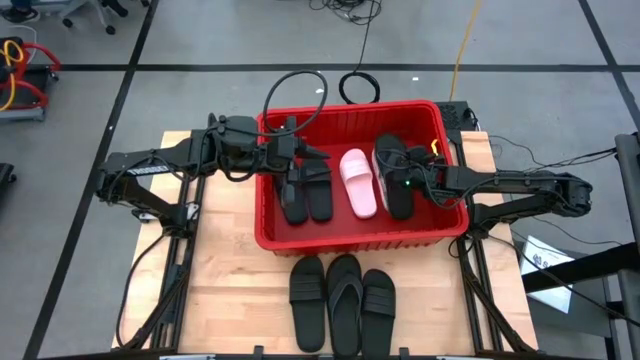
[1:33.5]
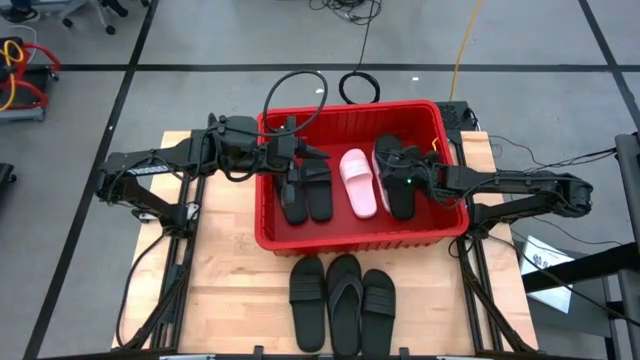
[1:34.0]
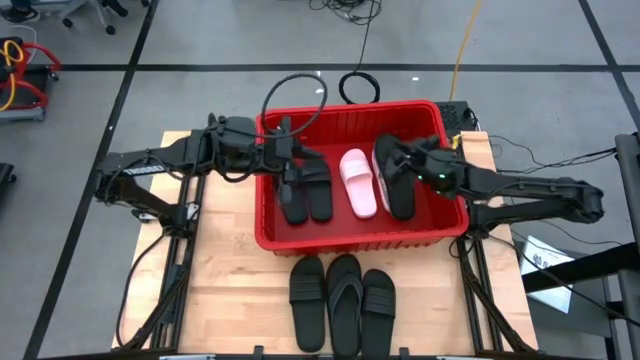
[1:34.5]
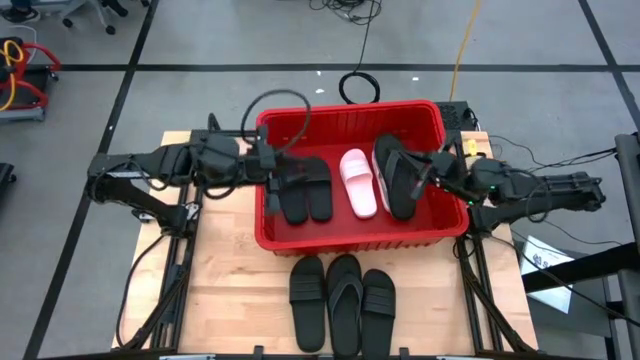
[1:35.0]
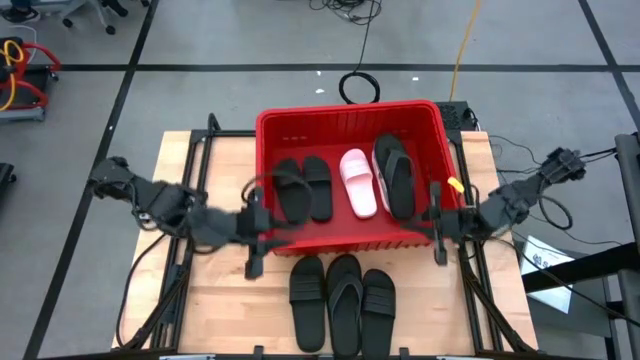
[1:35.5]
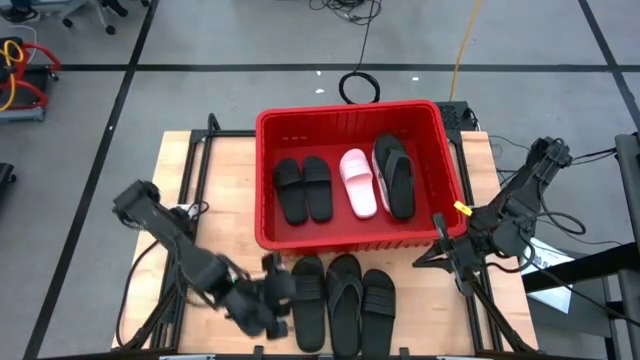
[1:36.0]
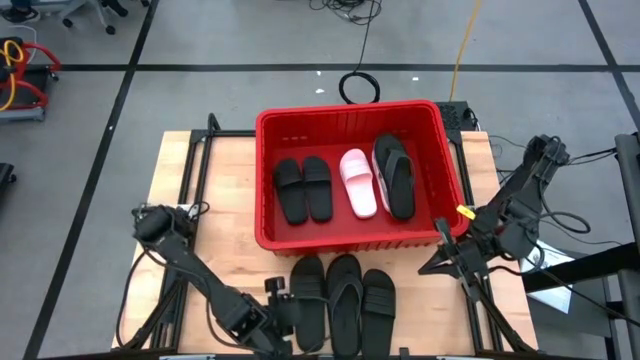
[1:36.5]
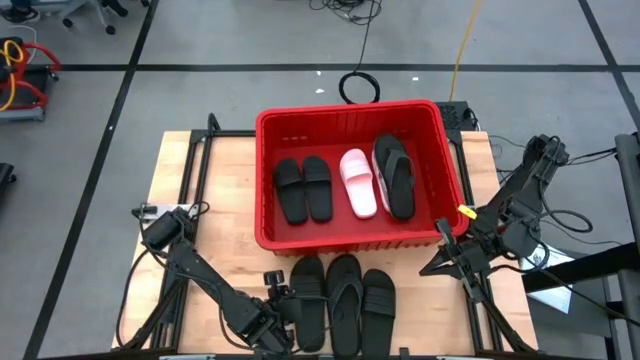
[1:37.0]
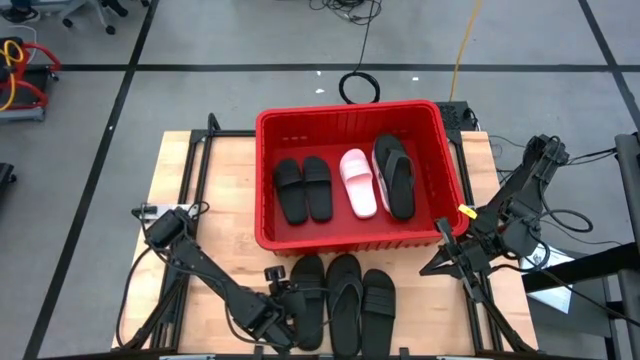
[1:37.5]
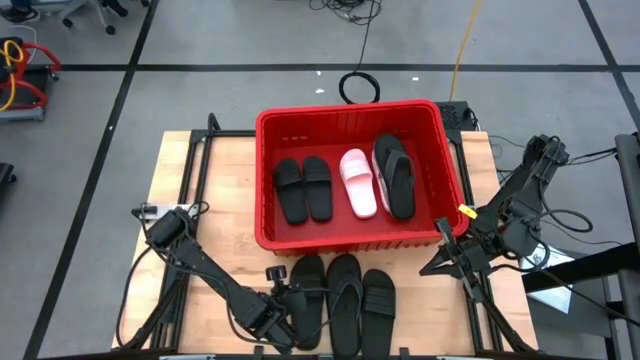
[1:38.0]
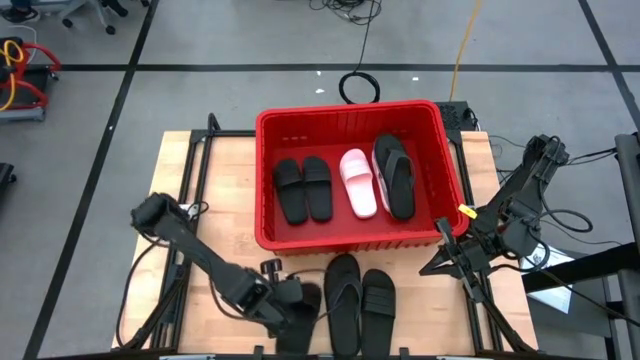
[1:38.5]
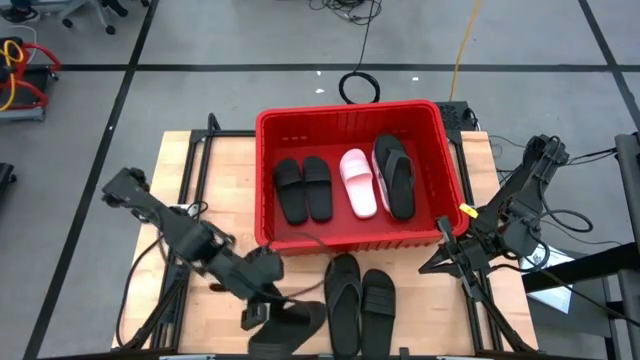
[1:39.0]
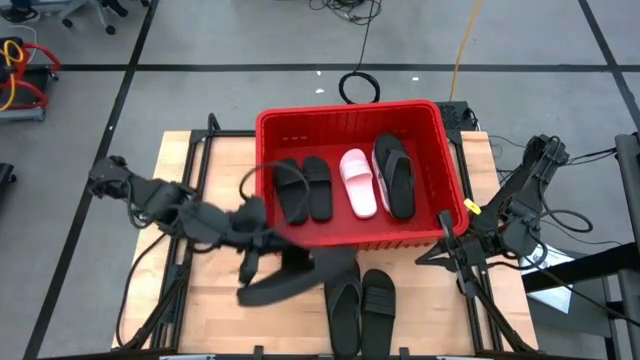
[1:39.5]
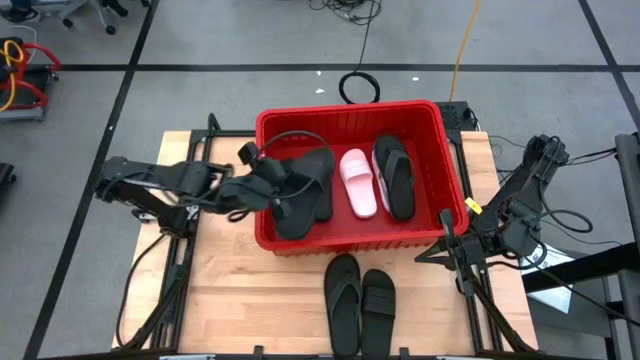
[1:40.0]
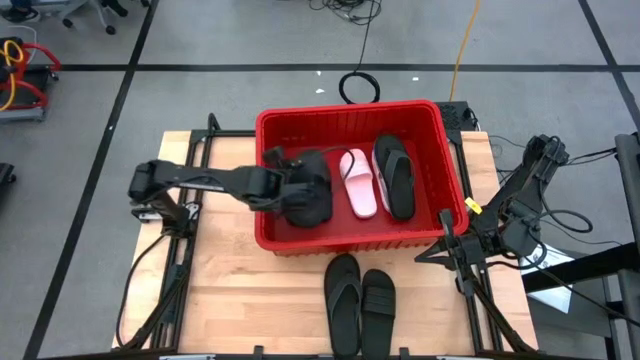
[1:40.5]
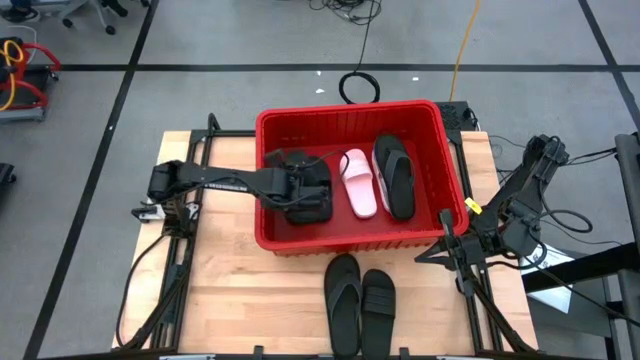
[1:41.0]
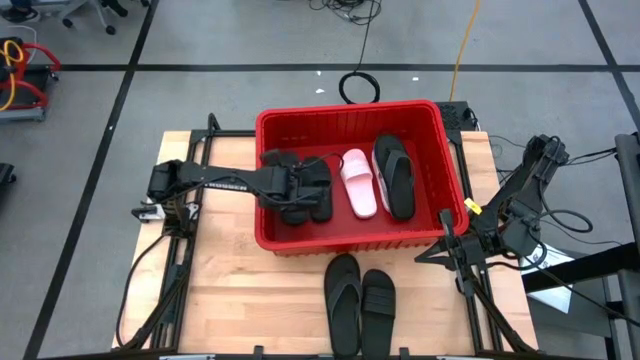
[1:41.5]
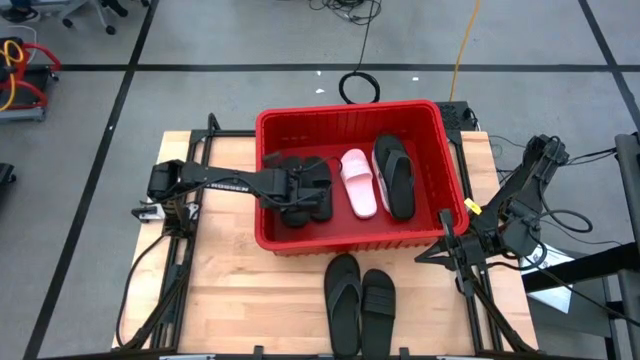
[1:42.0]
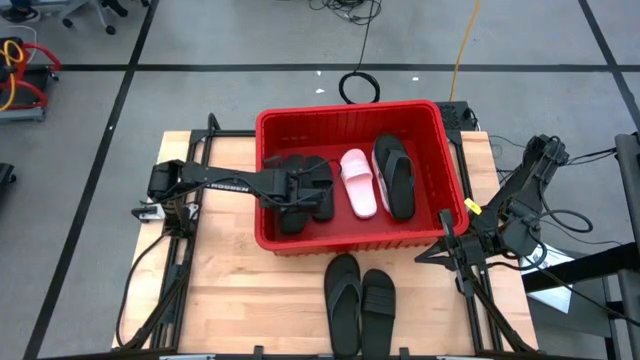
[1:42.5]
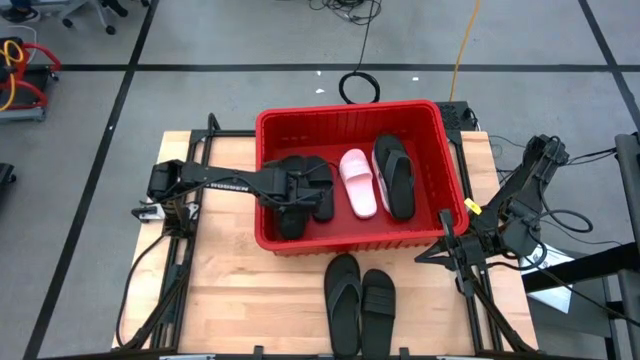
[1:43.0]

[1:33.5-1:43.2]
Task: Pick and place slides into bin
Put the black slide into the red bin

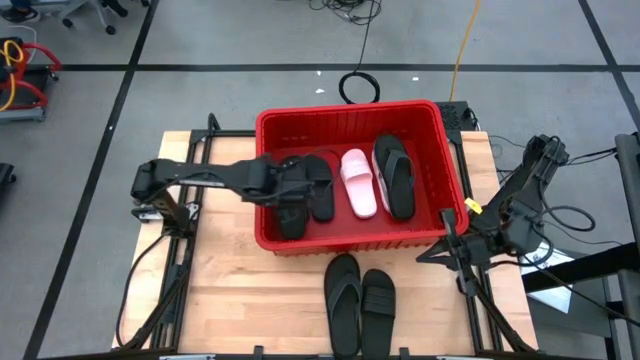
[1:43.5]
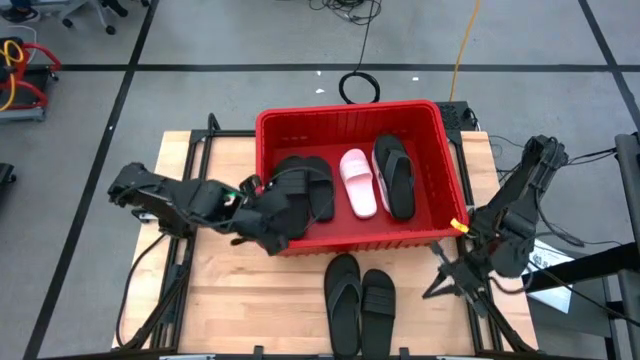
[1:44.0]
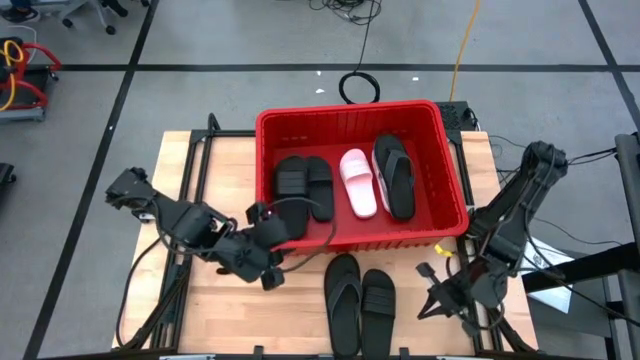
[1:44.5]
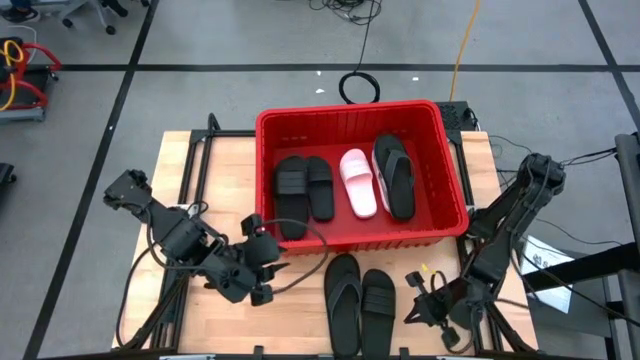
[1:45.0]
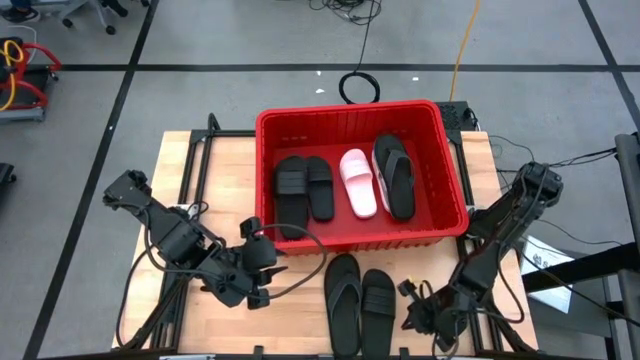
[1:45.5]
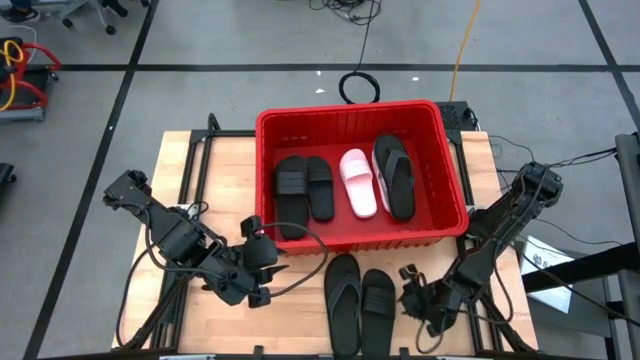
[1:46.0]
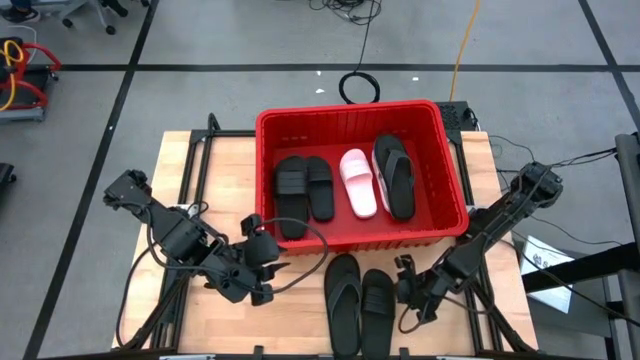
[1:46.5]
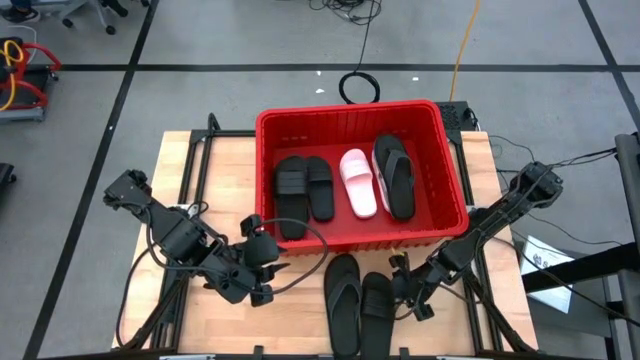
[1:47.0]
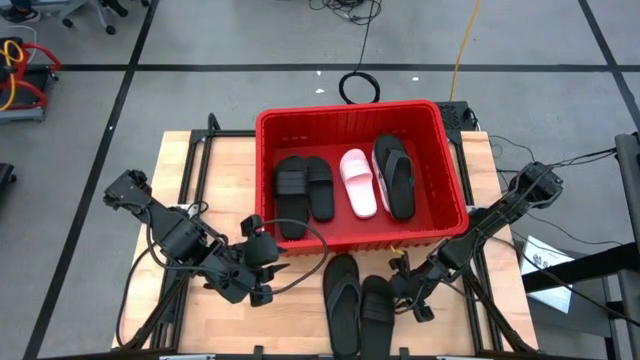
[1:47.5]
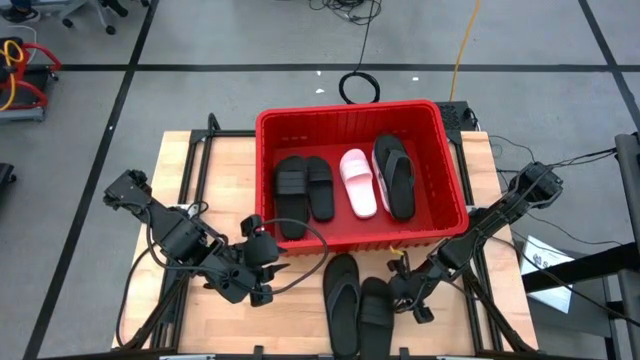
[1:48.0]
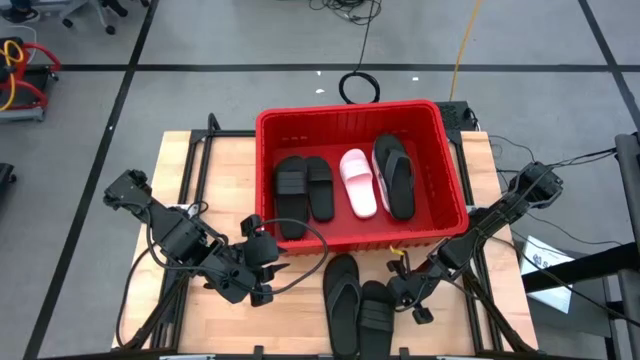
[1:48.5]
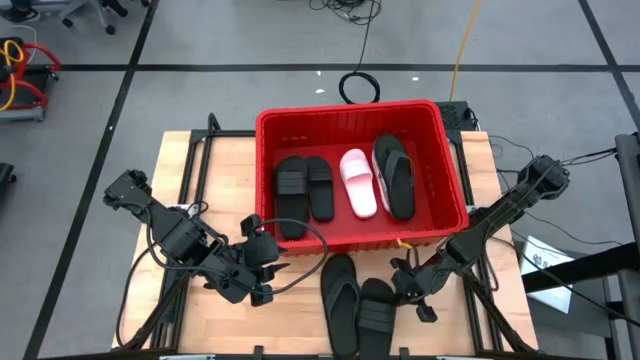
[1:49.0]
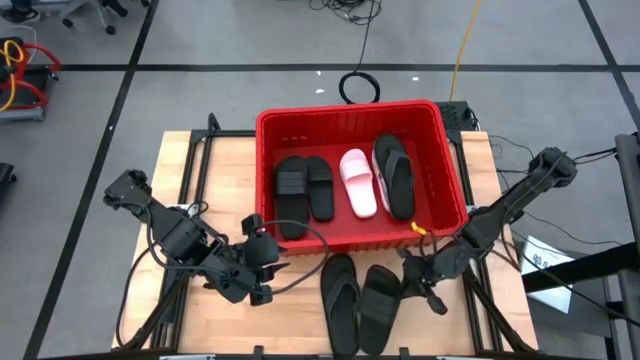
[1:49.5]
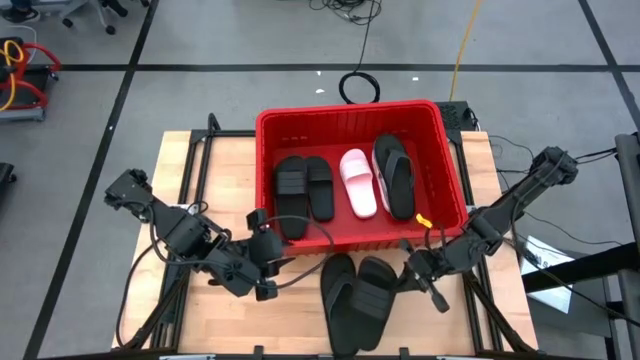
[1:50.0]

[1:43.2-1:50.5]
Put the black slide into the red bin

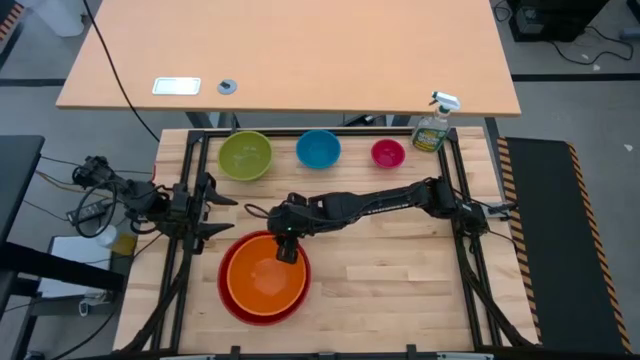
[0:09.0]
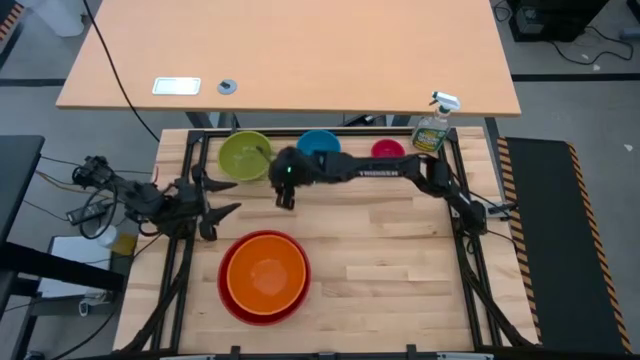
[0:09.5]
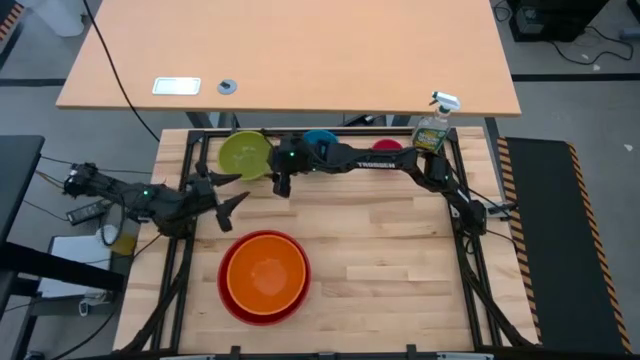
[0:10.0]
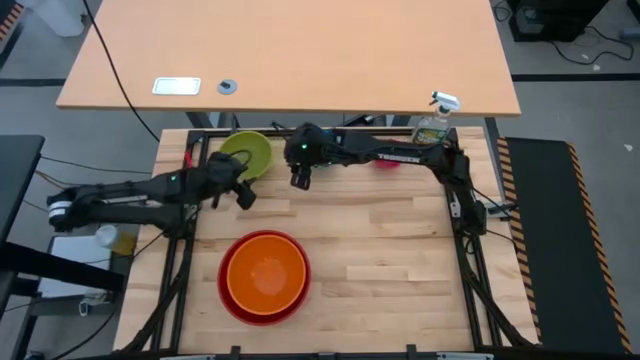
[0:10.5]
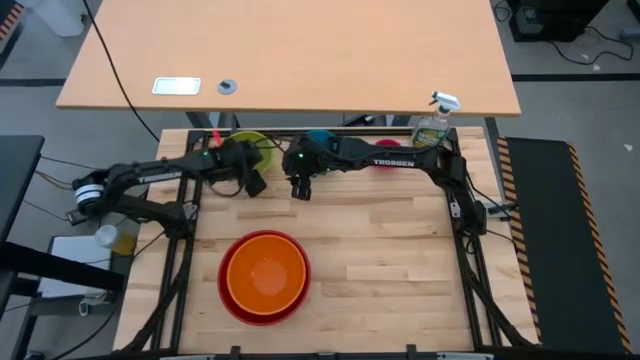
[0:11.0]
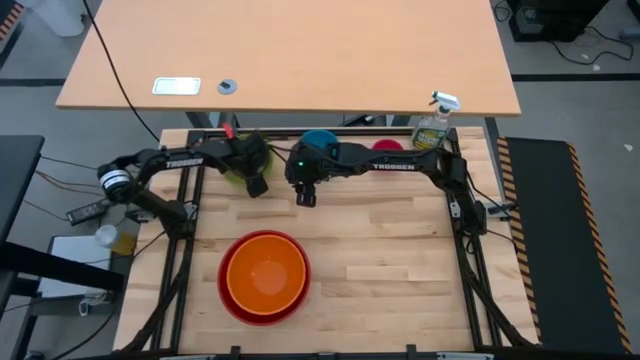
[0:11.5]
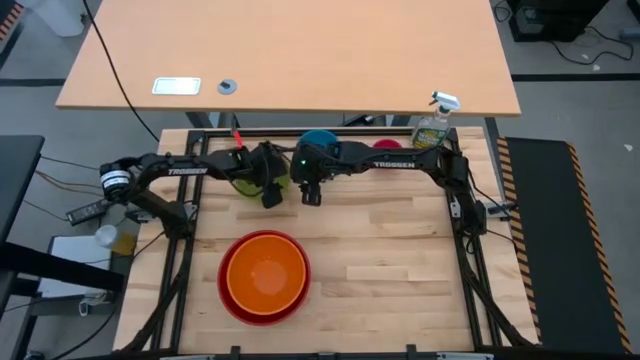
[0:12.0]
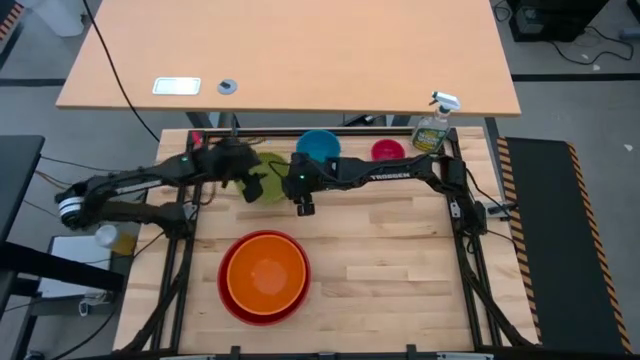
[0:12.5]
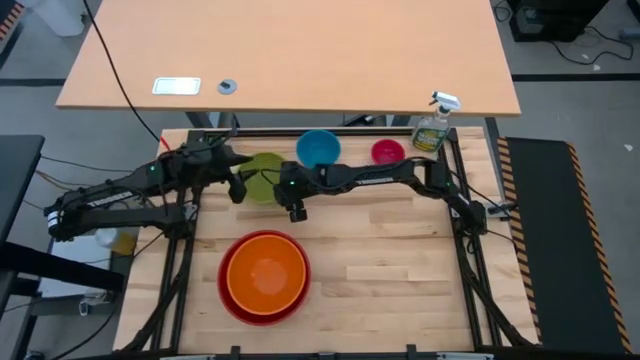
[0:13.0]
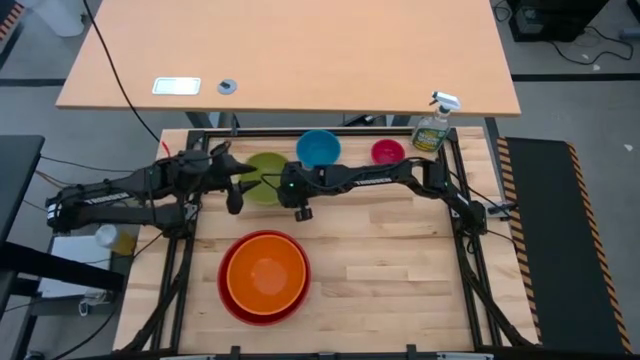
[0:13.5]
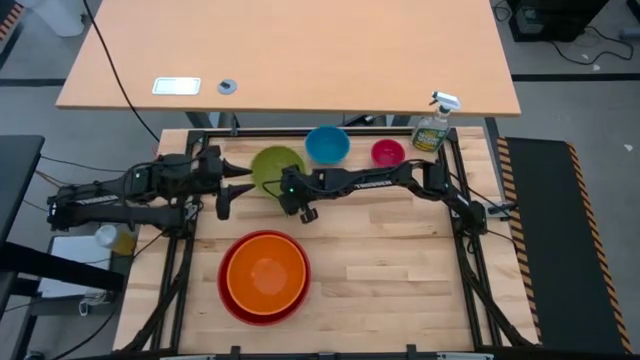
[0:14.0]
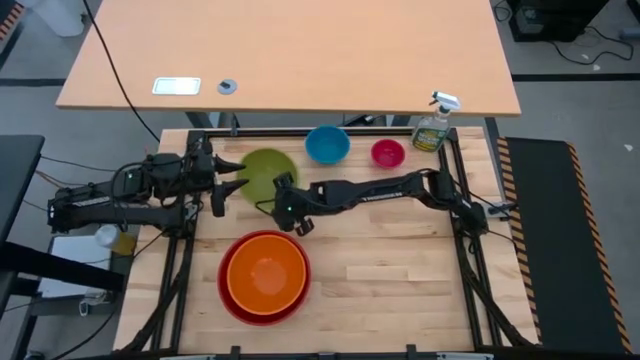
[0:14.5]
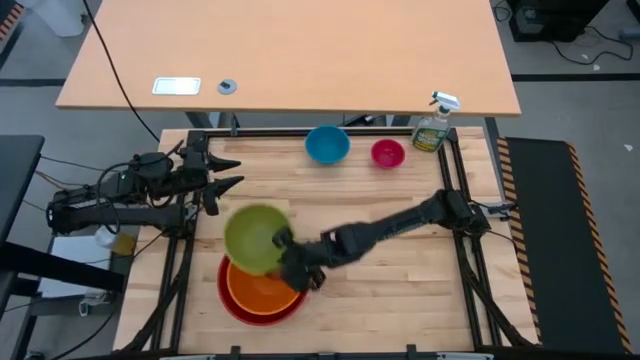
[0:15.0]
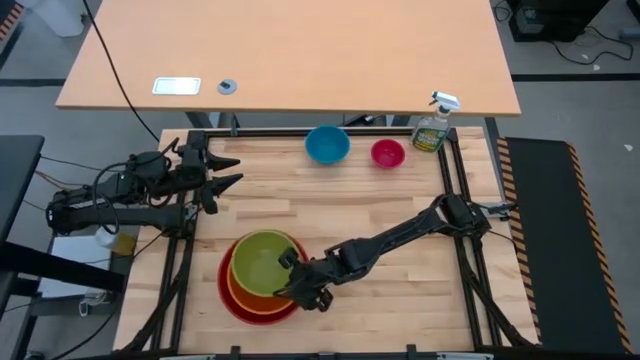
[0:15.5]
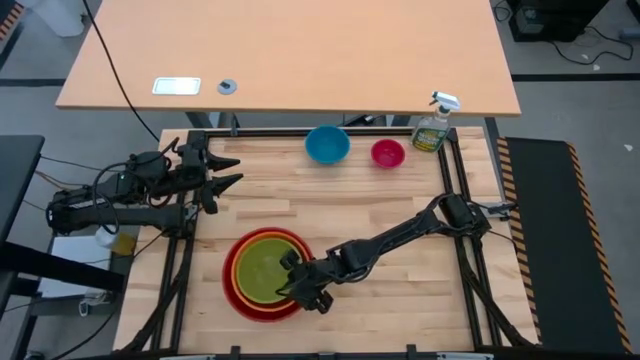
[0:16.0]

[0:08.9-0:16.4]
Task: Nest bowls inside each other by size order
Stack the green bowl on top of the orange bowl
